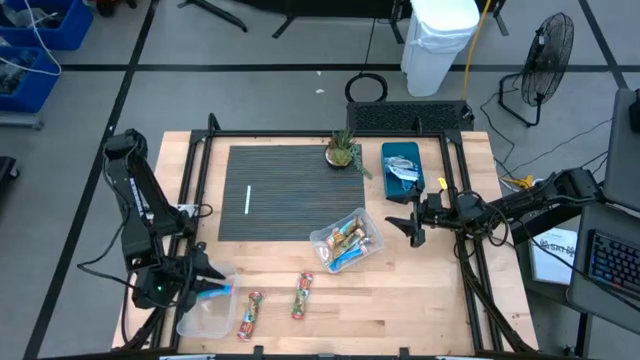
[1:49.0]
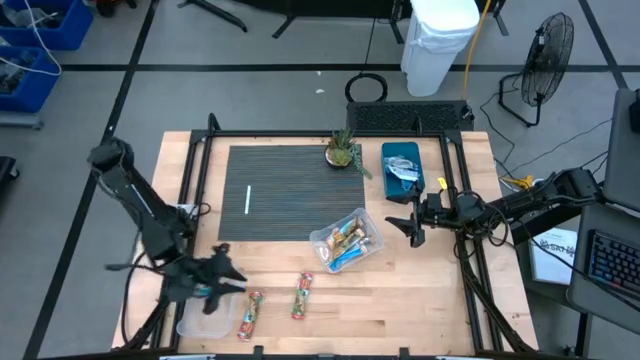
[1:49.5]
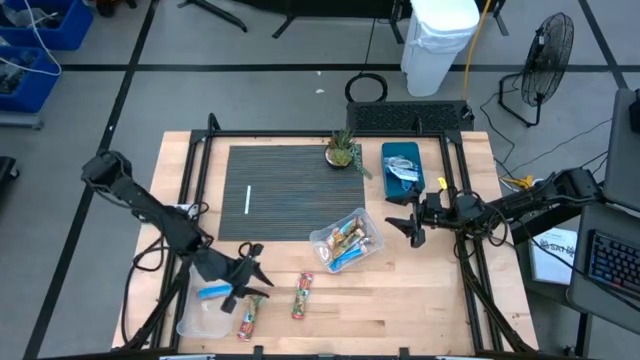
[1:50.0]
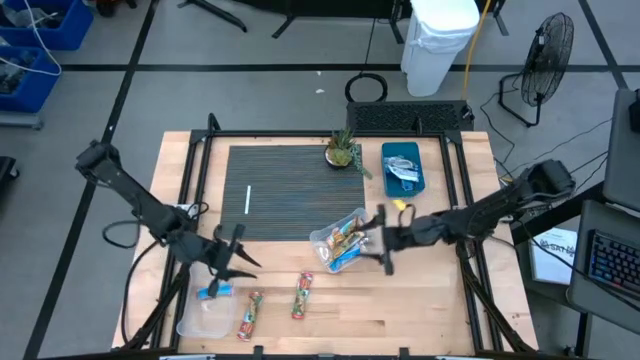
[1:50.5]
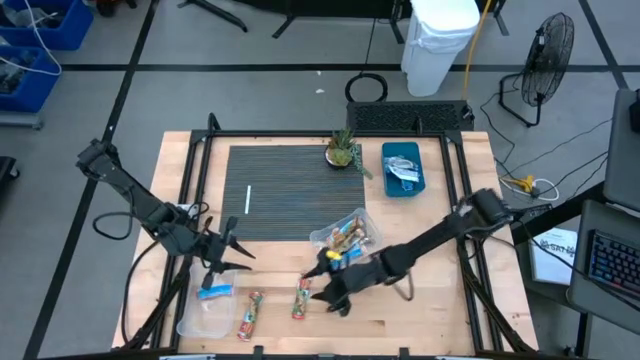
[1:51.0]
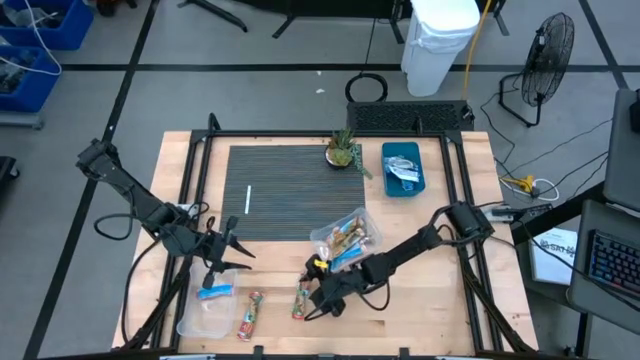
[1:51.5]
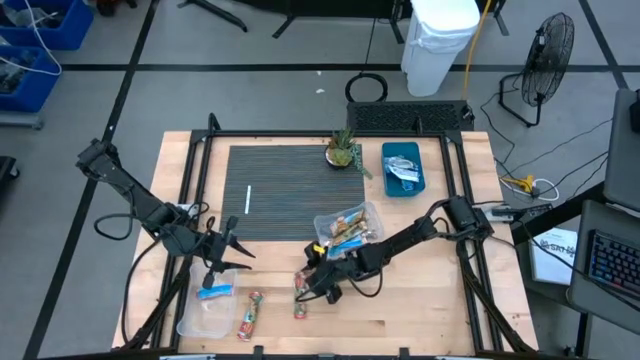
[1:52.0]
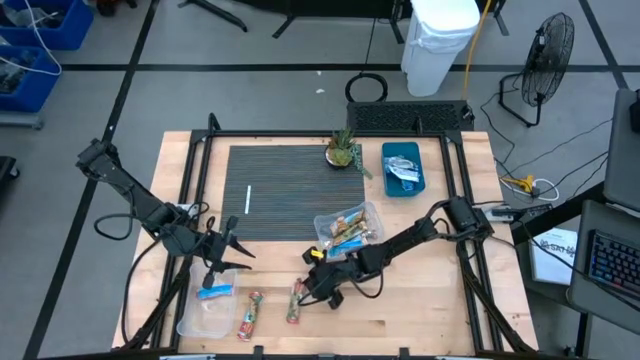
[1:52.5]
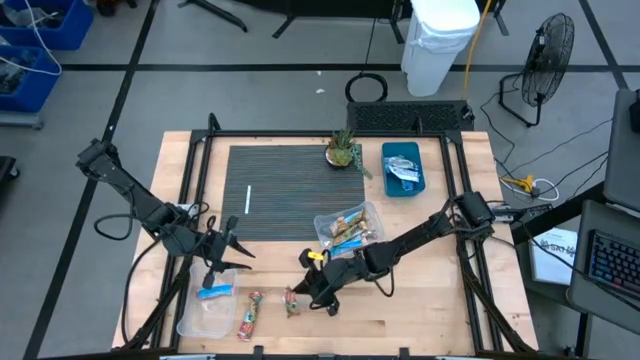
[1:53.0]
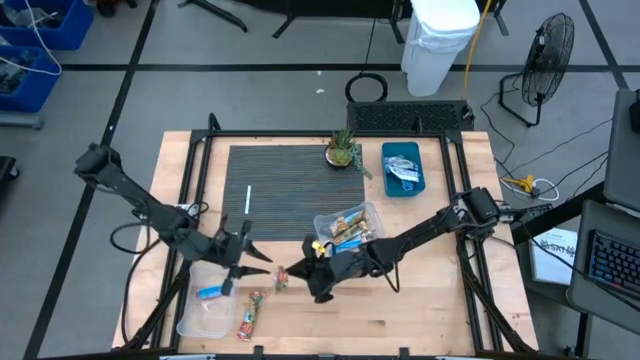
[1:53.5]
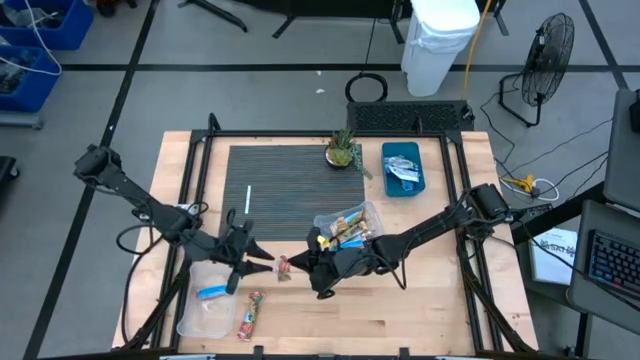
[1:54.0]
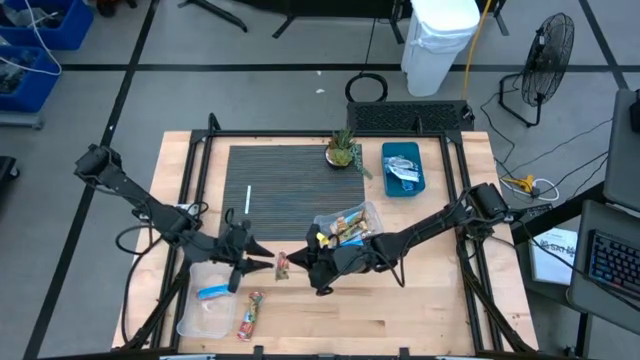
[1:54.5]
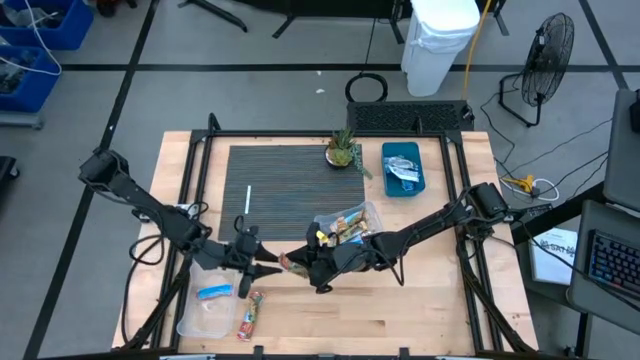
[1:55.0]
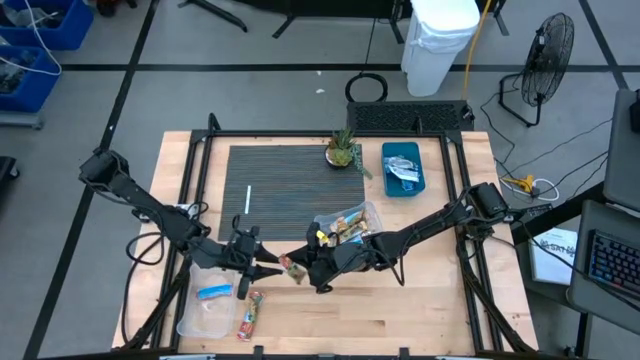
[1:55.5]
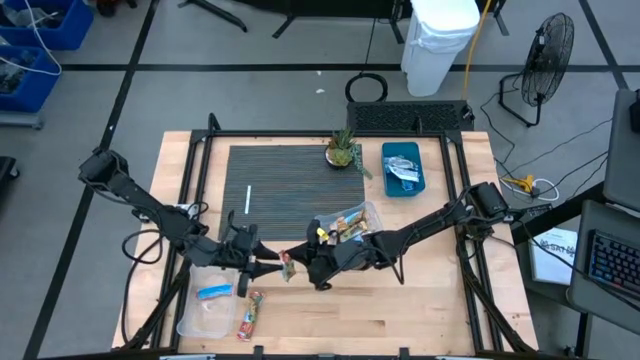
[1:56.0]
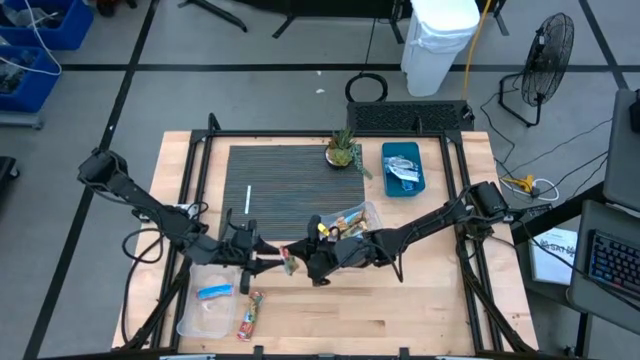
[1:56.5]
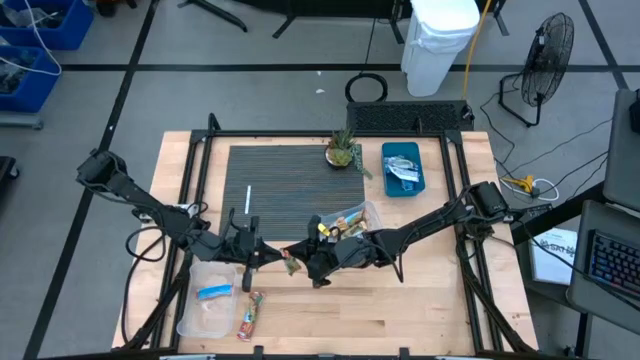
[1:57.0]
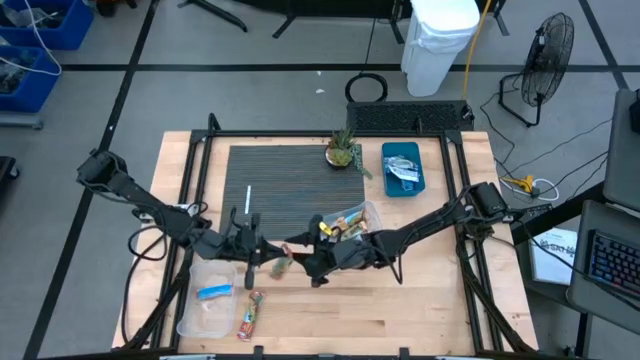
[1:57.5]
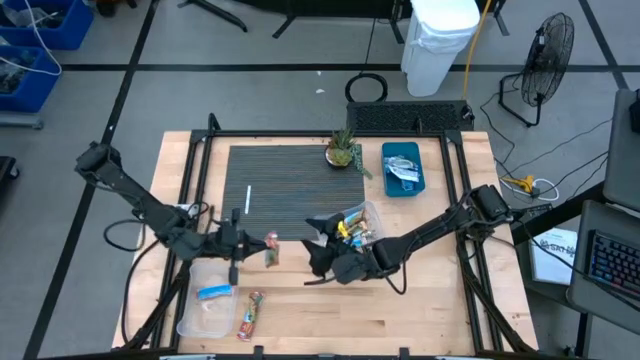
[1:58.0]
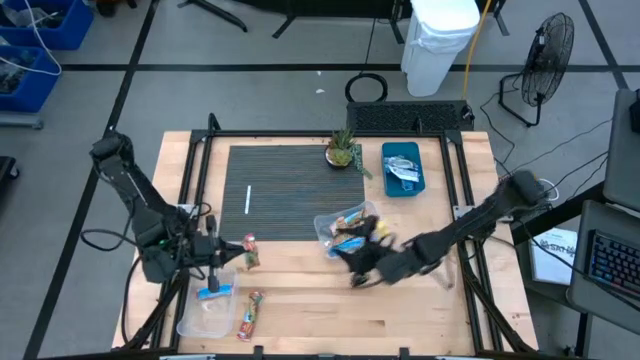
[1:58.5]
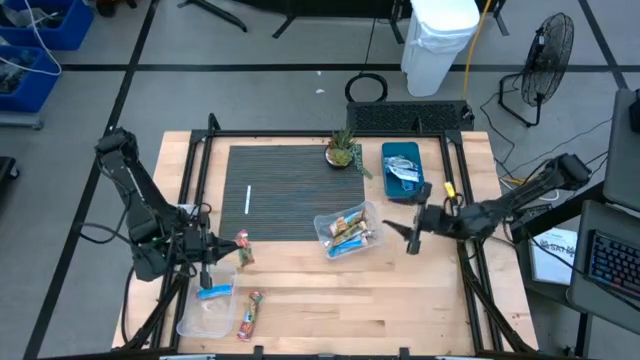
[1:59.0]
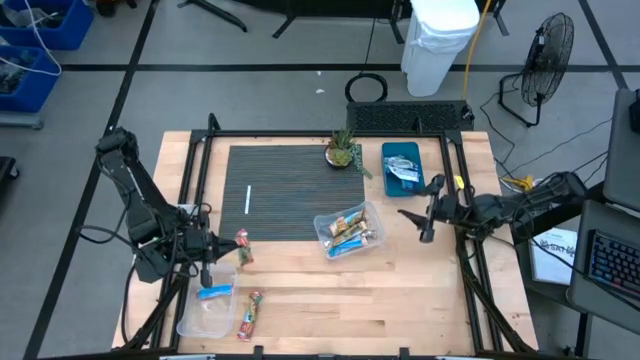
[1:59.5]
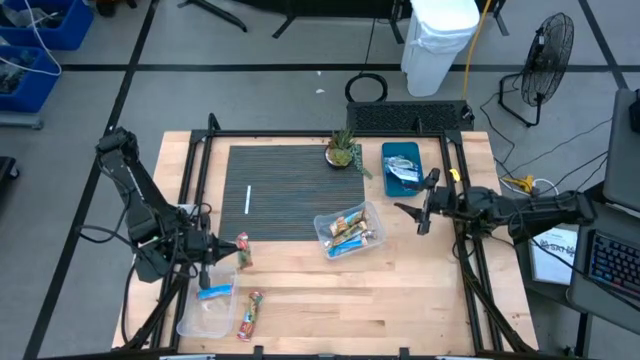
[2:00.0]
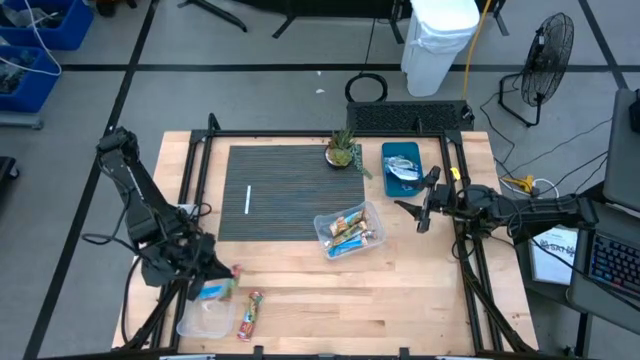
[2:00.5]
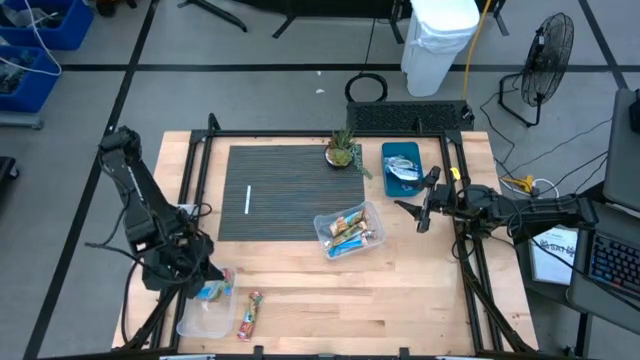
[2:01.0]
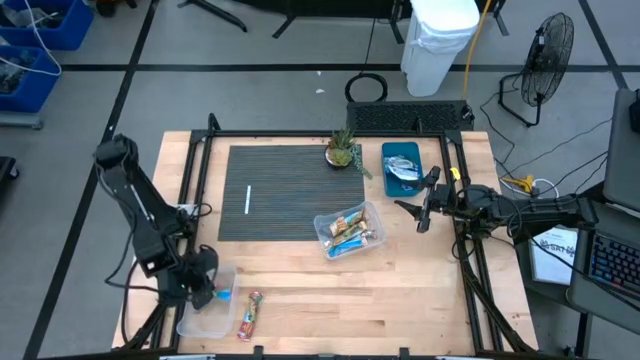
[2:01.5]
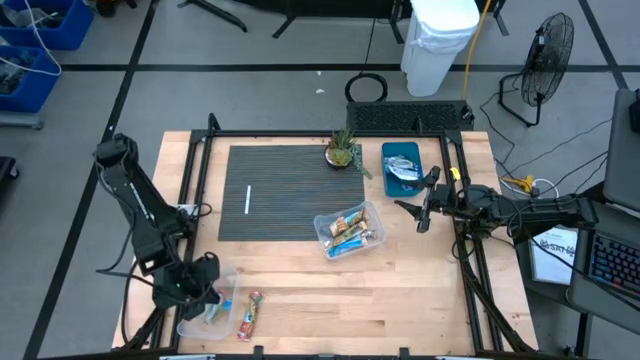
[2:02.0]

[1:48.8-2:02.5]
Task: Pick and place Granola Bars by type
Put the right red granola bar into the bottom transparent bin

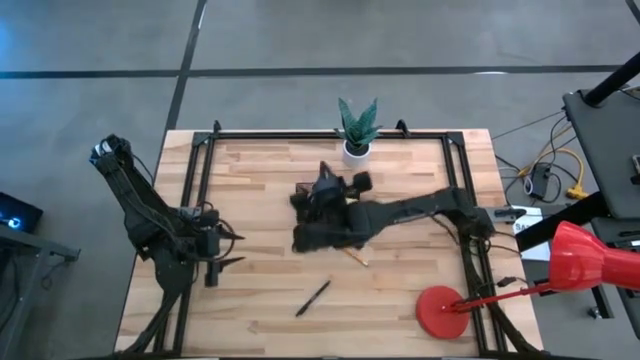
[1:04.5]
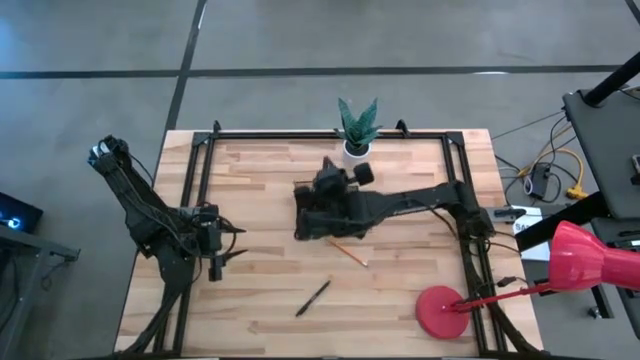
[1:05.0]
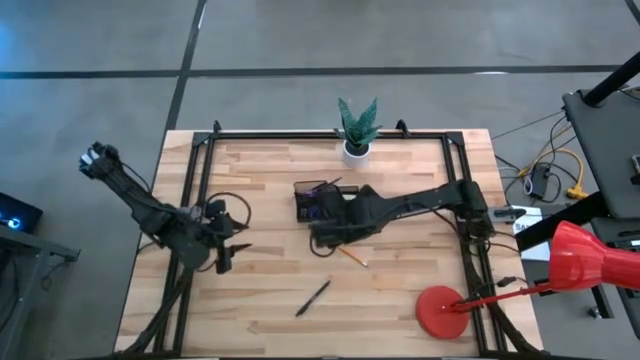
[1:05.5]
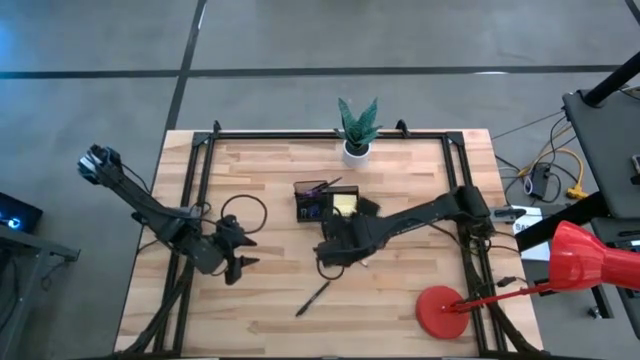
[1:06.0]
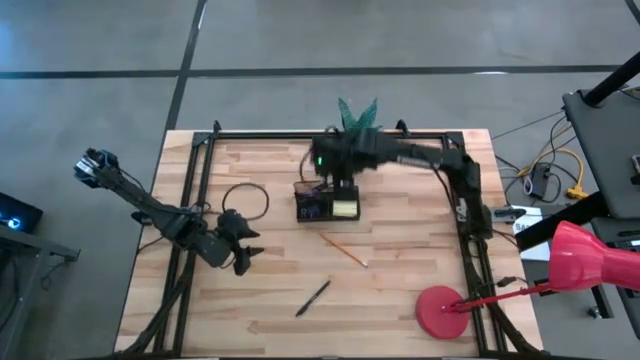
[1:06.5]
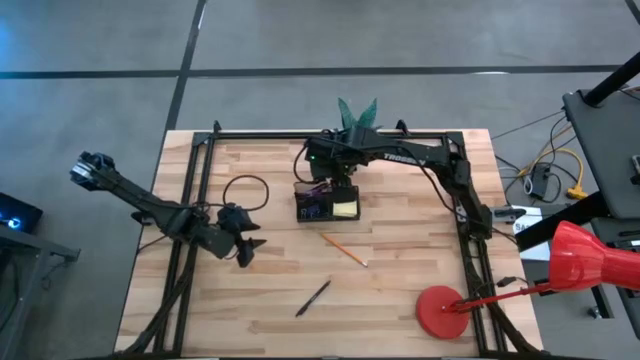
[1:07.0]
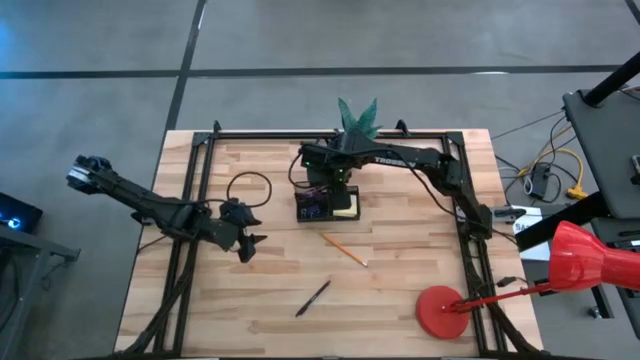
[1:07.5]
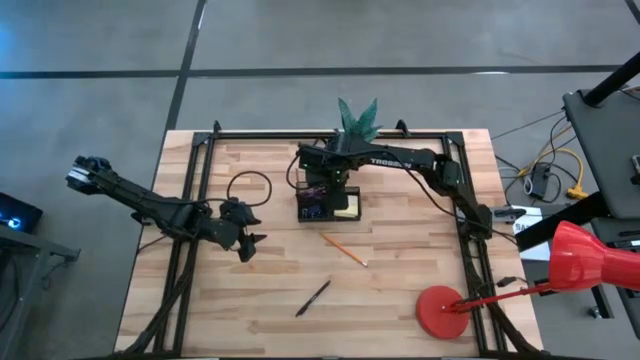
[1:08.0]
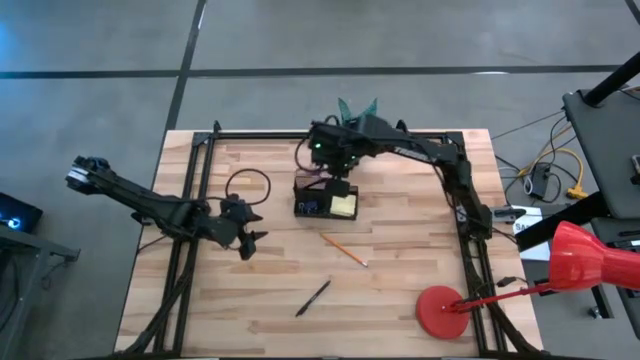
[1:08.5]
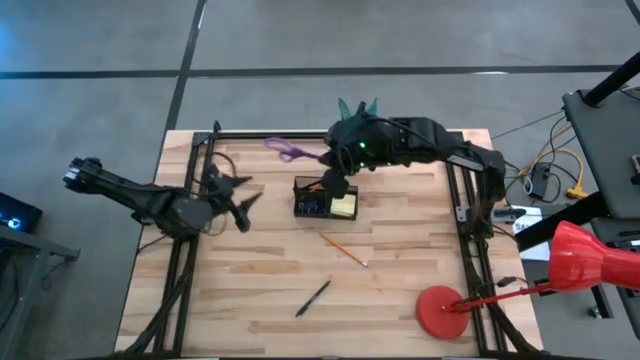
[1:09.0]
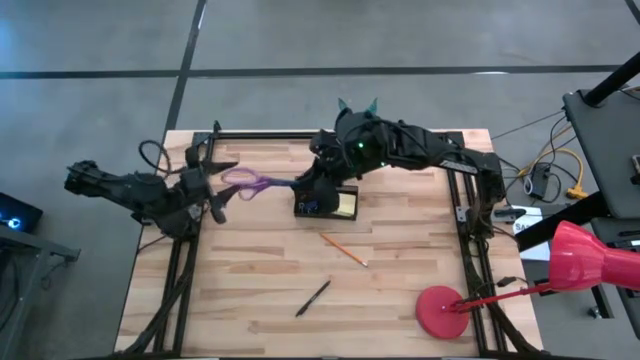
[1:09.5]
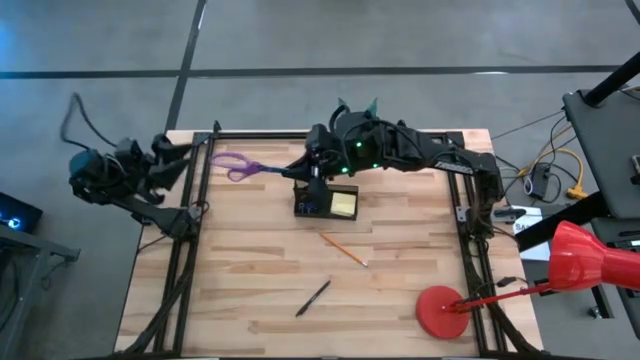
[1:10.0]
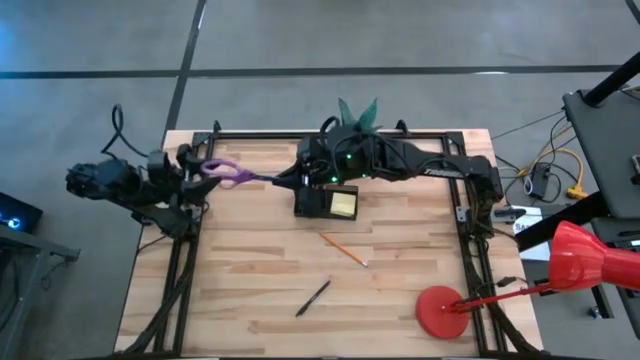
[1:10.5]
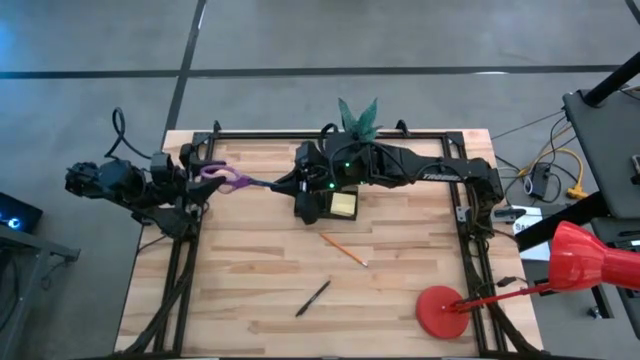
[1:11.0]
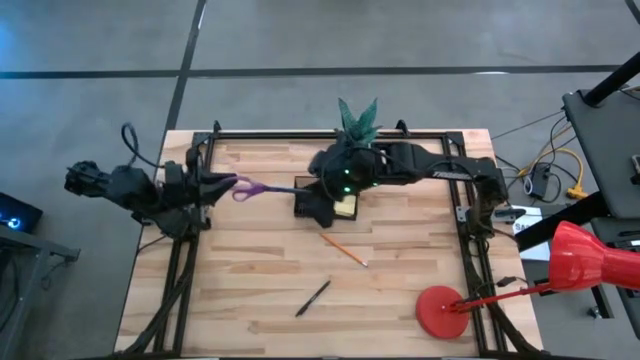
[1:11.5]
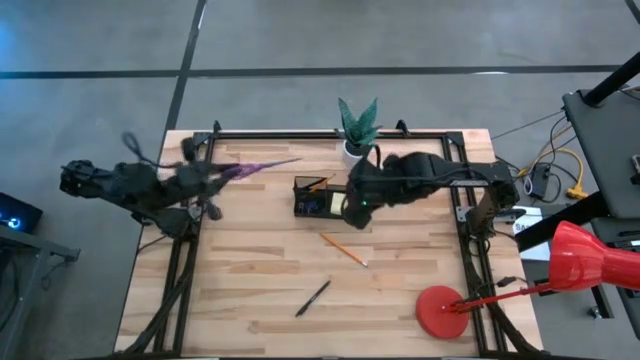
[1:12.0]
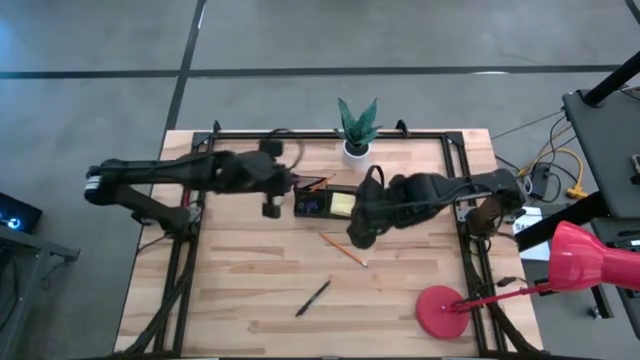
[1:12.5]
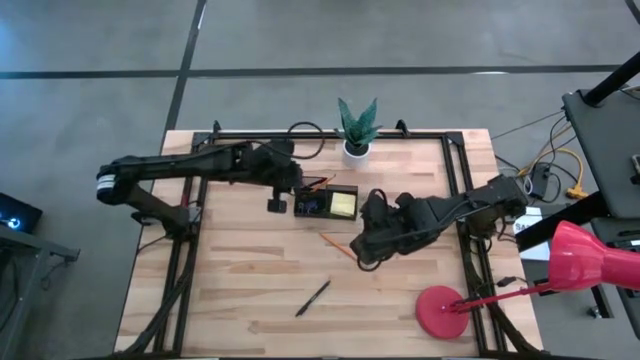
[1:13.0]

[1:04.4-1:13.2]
Task: Pick and place office supplies into organizer
Put the scissors into the desk organizer
